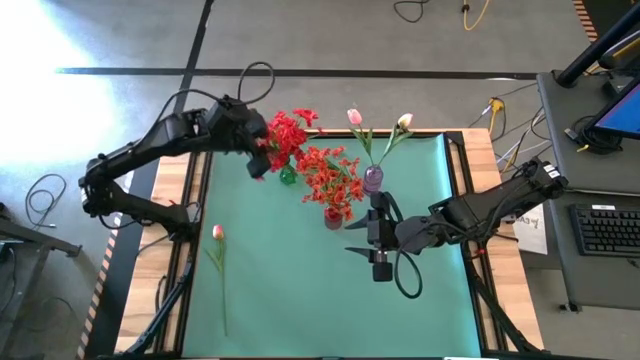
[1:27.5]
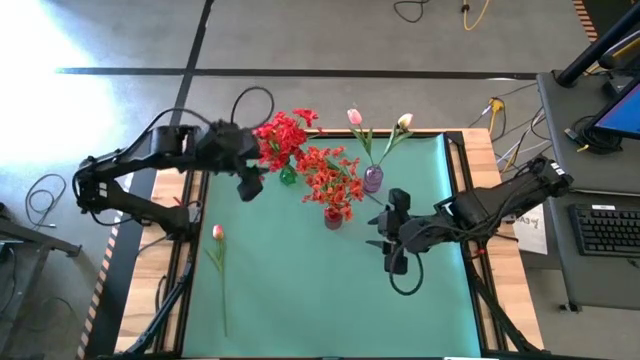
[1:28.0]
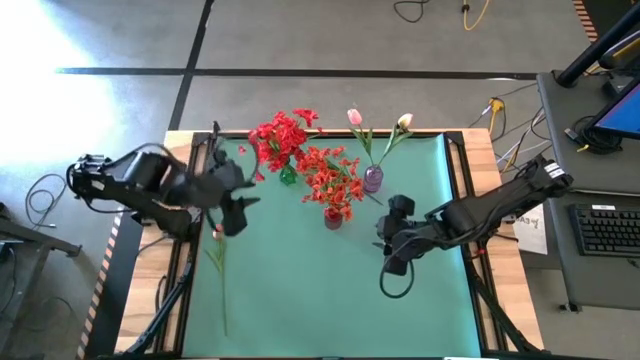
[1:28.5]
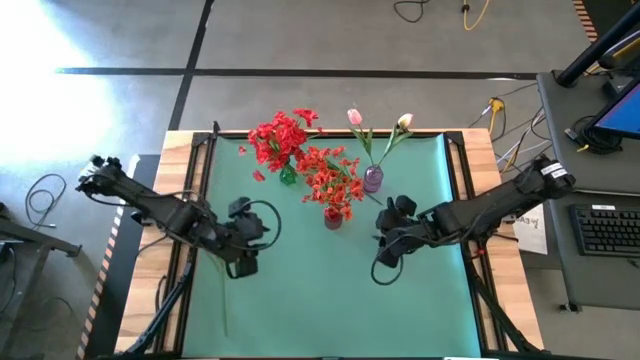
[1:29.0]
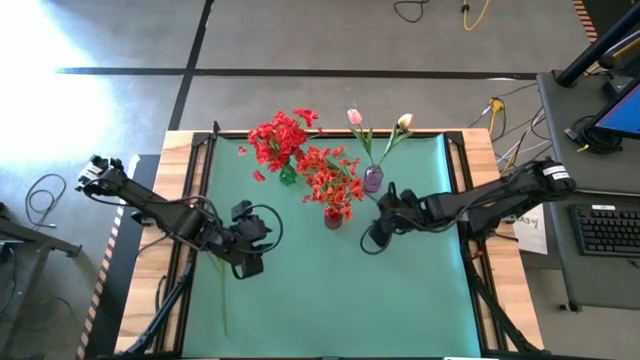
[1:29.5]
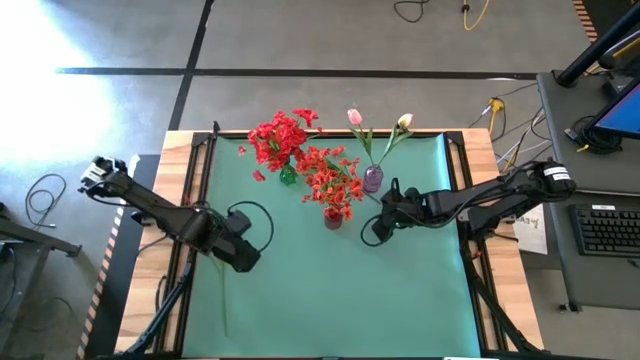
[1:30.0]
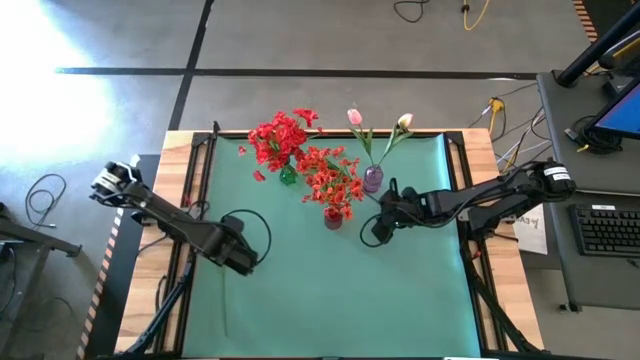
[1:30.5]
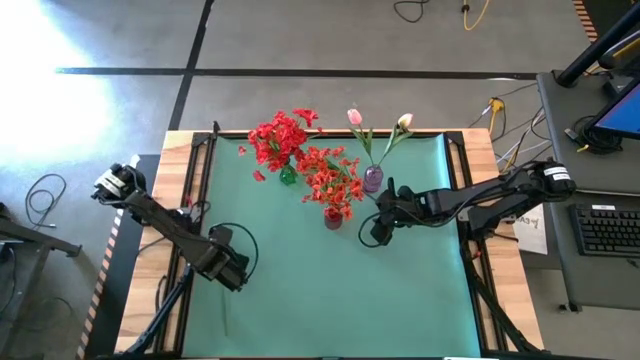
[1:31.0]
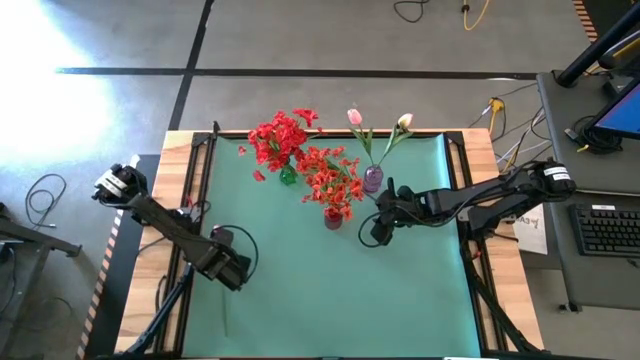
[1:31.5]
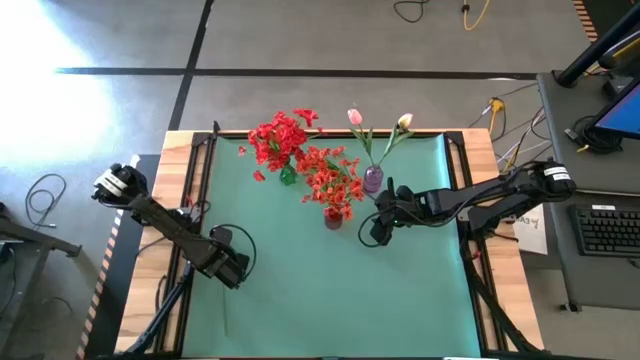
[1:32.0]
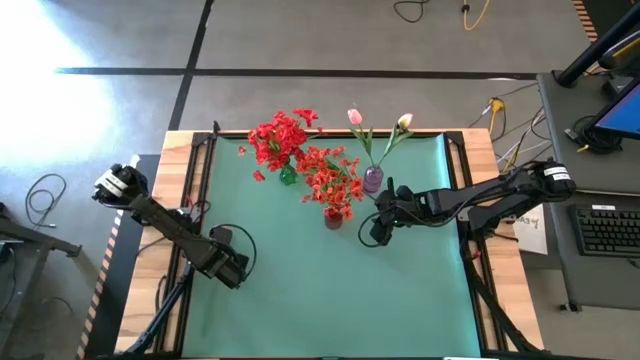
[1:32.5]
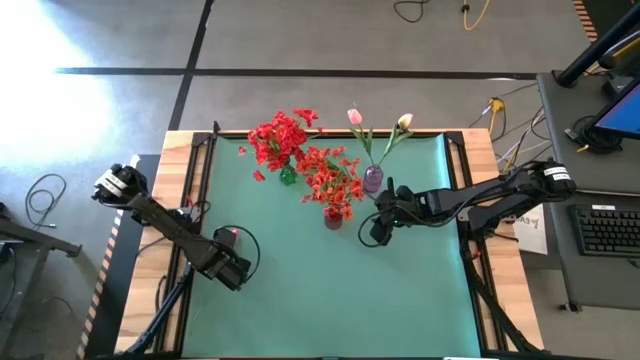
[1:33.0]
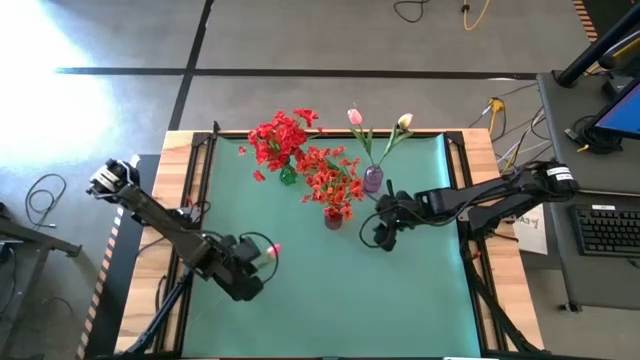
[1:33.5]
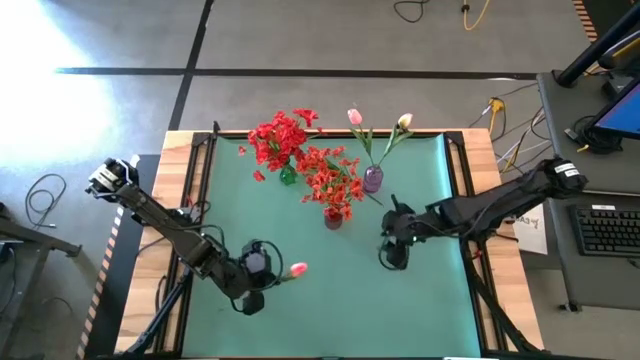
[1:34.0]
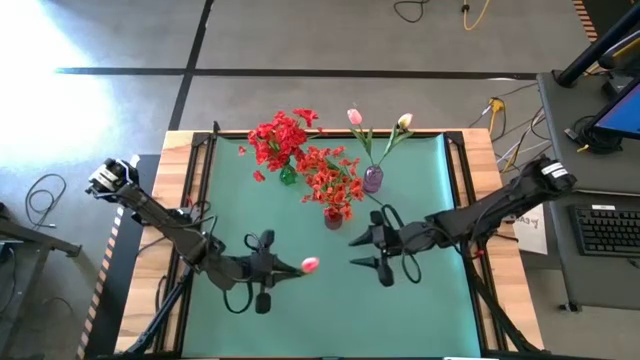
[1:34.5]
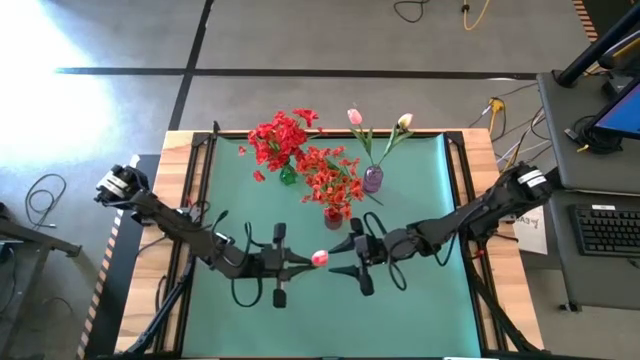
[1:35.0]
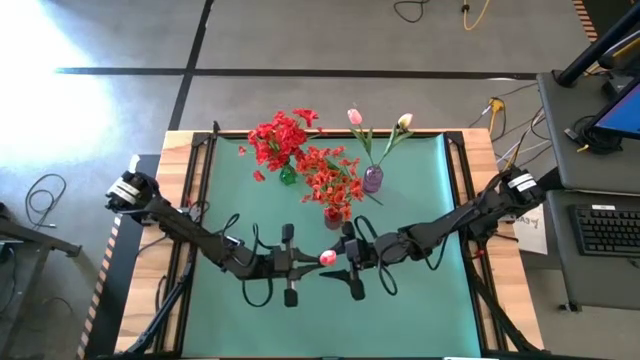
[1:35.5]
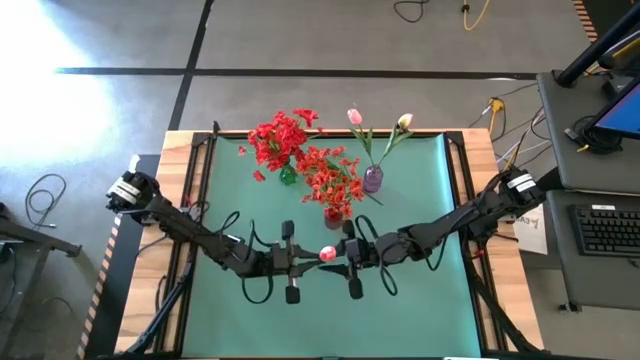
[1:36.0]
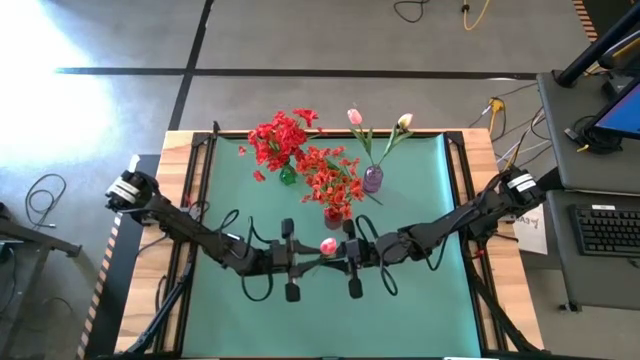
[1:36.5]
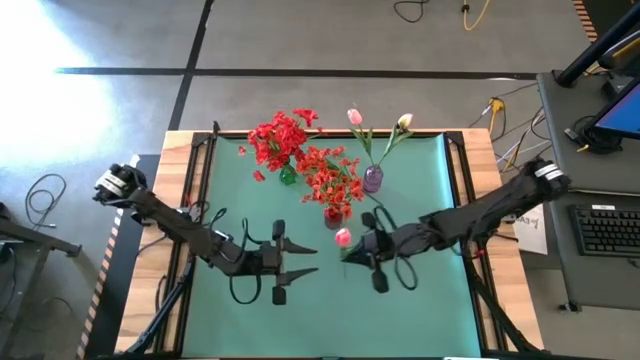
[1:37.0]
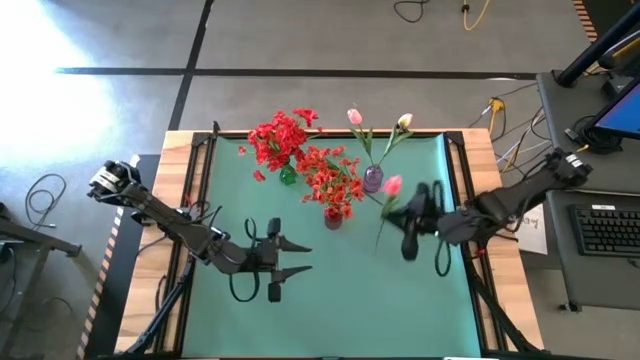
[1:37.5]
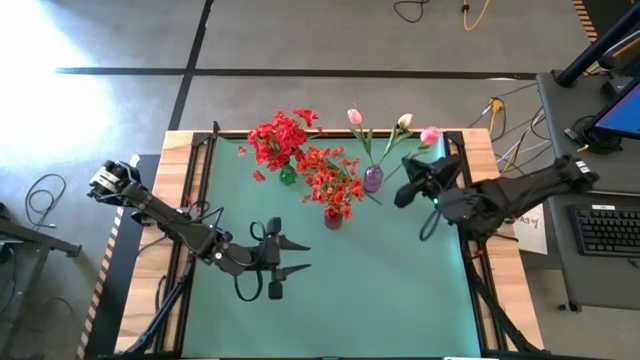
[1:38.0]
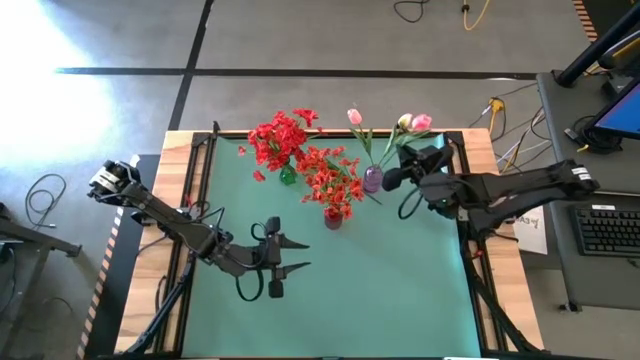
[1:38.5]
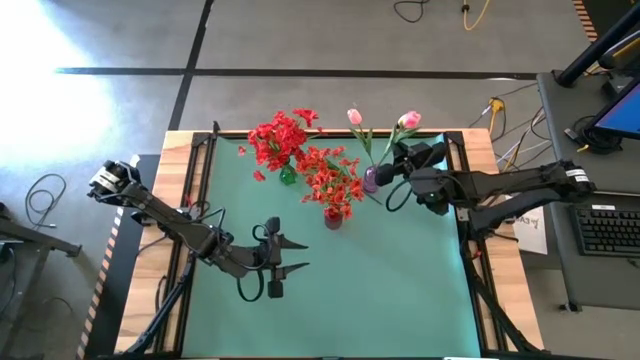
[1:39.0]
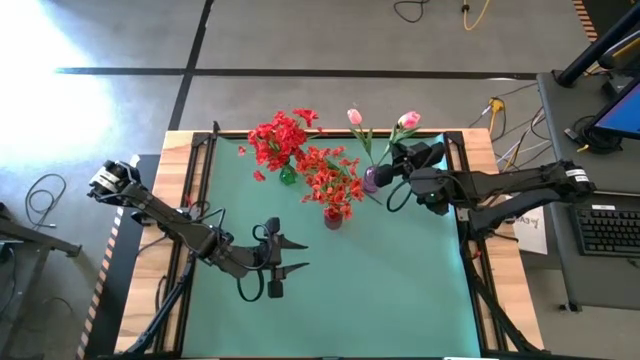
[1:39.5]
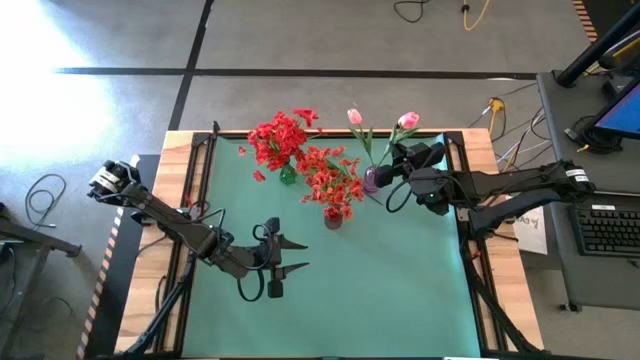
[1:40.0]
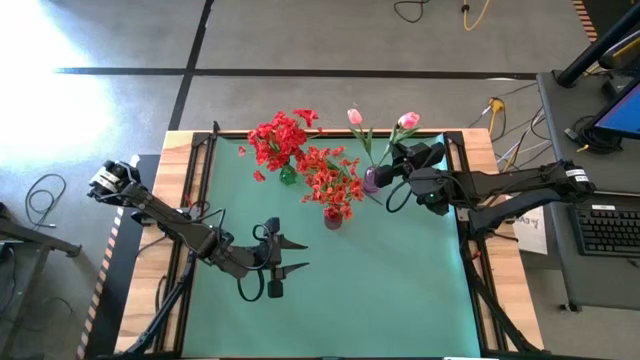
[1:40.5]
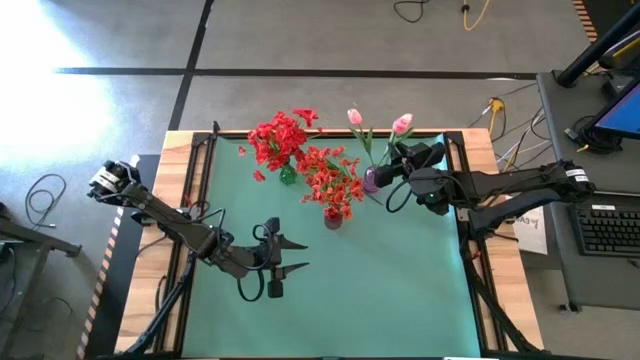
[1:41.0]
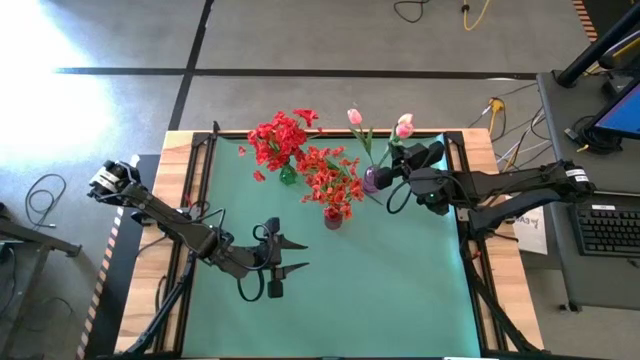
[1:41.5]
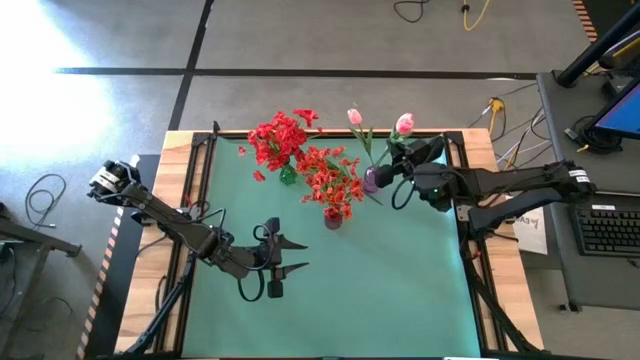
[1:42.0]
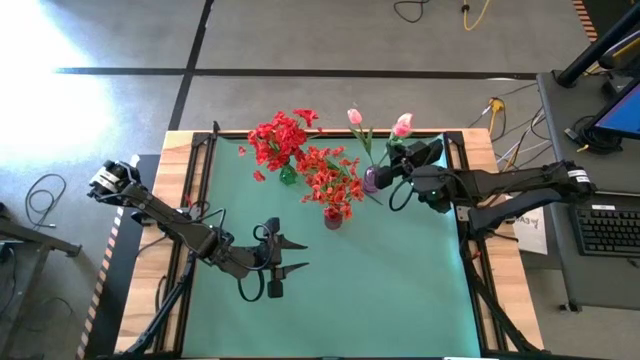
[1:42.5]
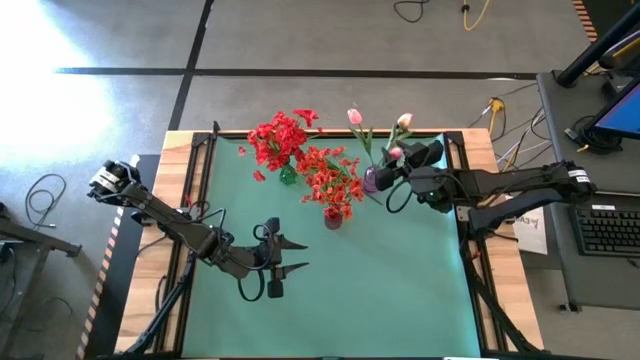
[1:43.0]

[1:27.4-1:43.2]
Task: Sort flowers into vase by color
Put the pink tulip into the purple vase

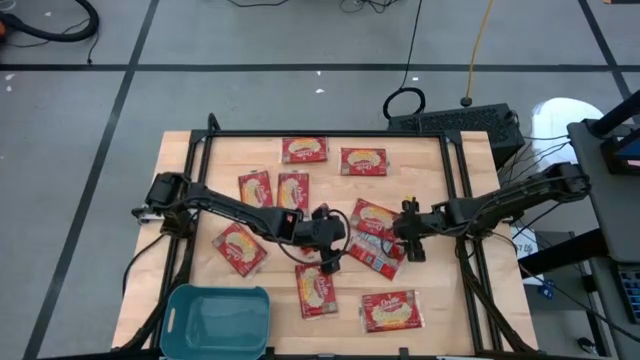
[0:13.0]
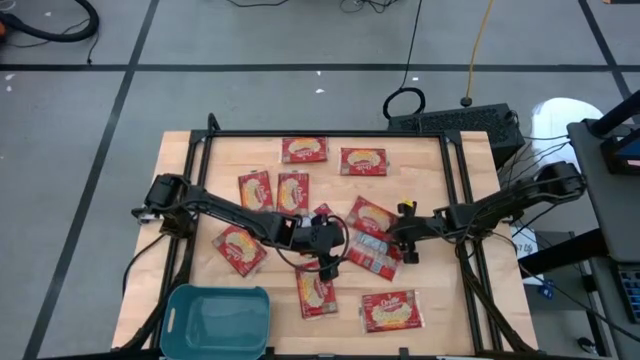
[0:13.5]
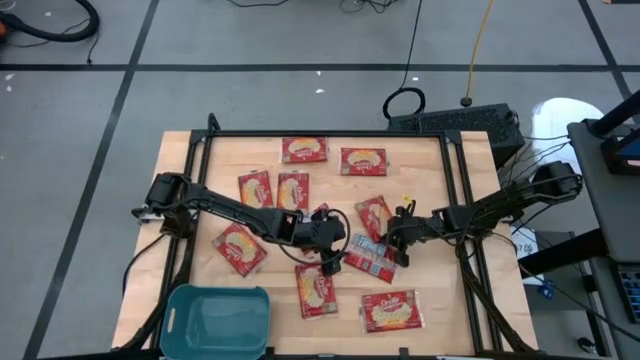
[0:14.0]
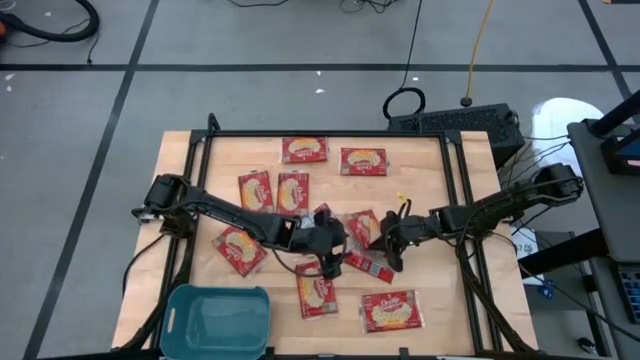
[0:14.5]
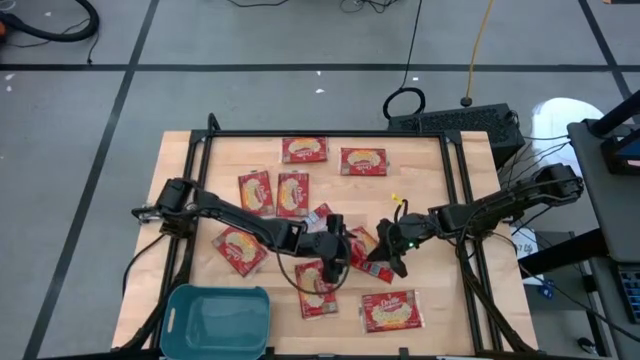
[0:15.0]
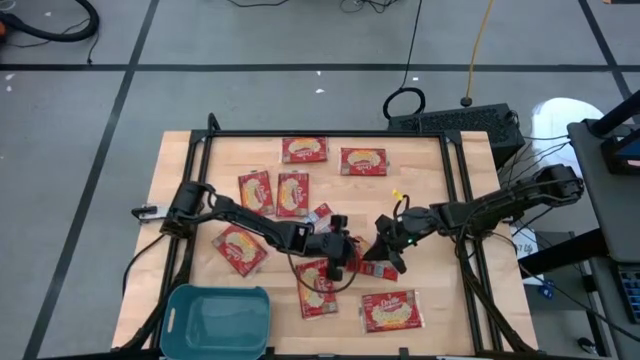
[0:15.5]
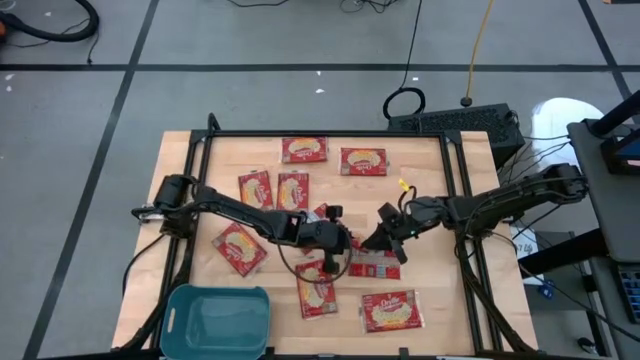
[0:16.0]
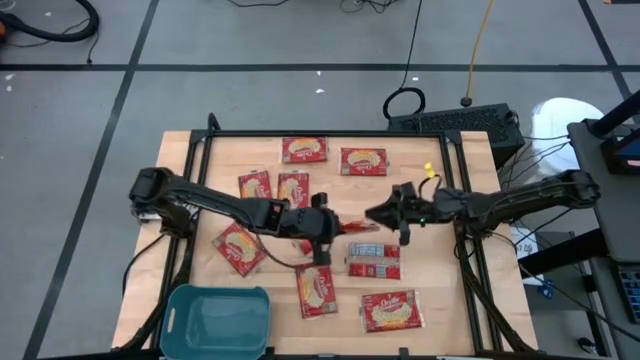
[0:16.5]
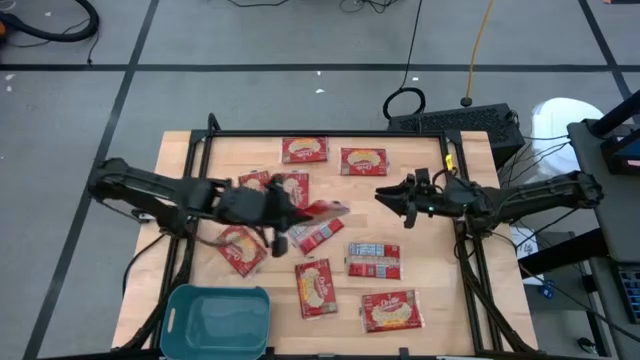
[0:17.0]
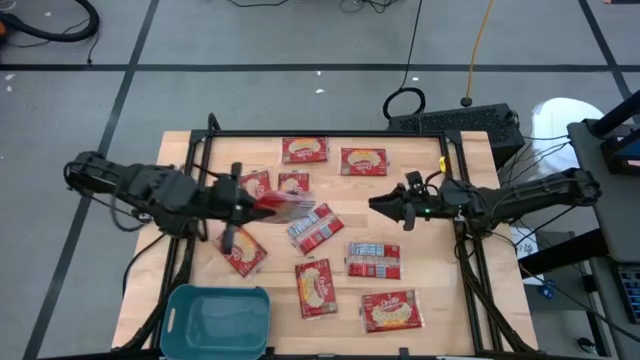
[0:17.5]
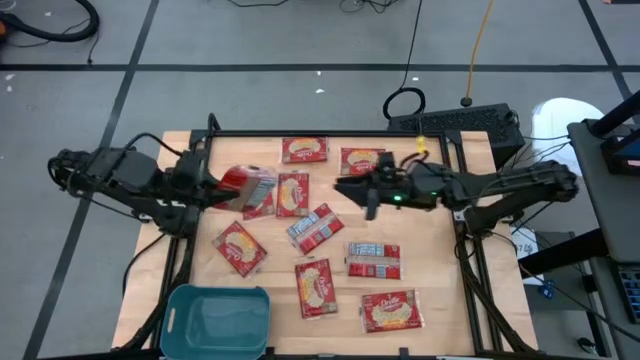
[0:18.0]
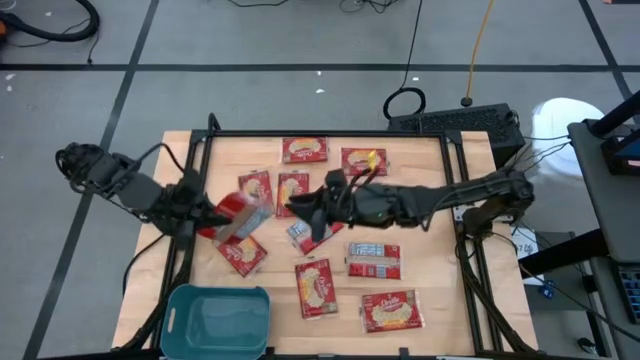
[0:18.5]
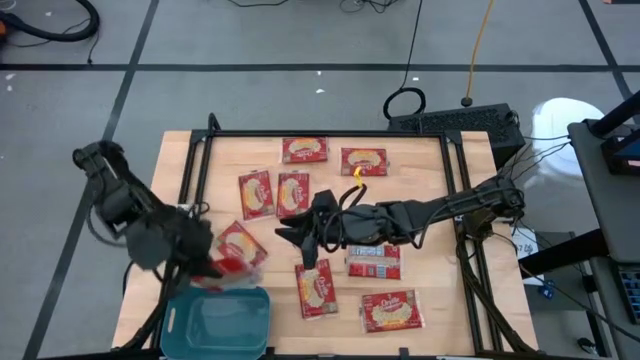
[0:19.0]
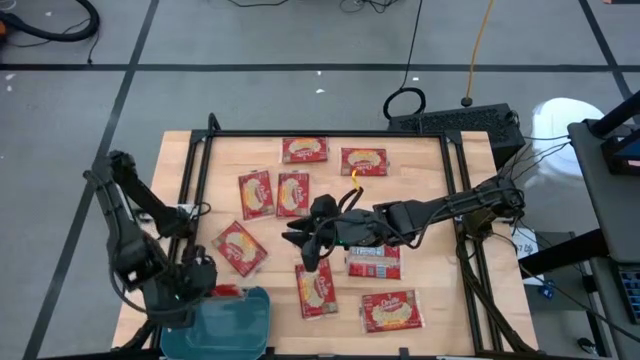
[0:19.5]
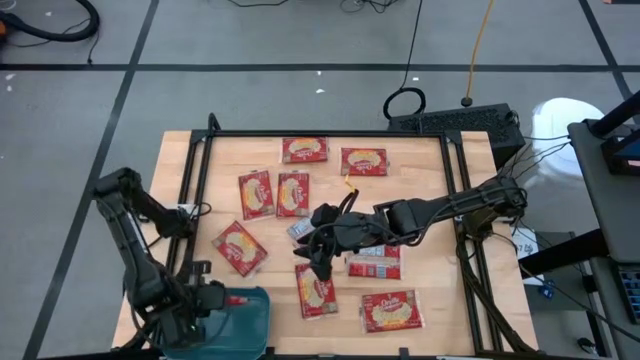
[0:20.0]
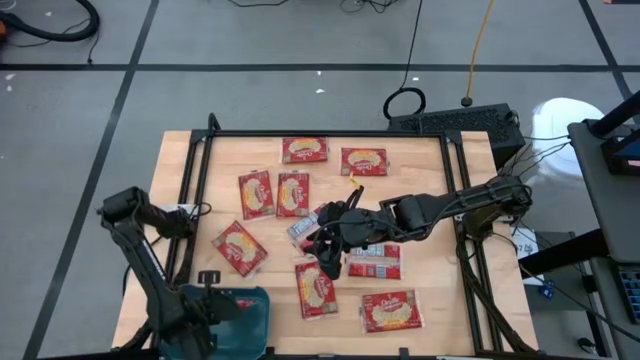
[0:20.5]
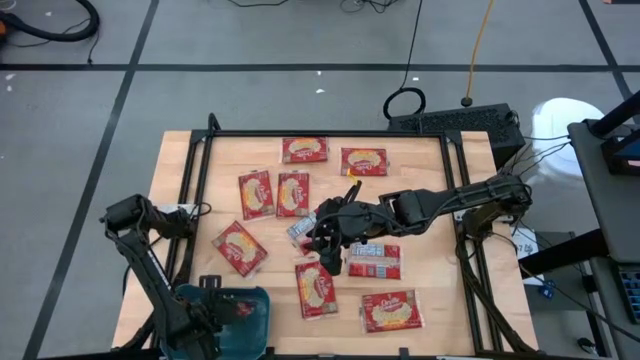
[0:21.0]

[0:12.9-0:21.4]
Task: Sort popcorn bags into baskets
Put the popcorn sachet into the bin
